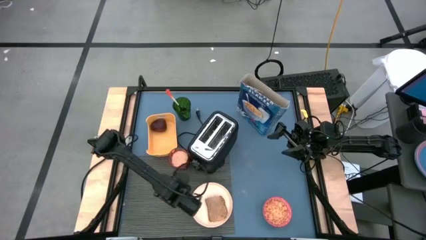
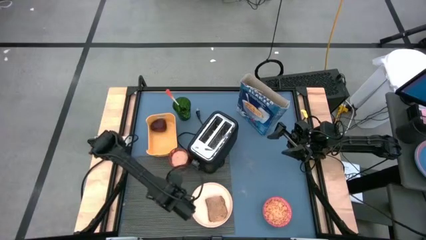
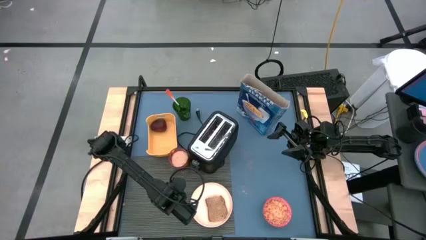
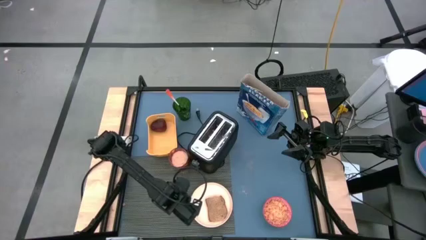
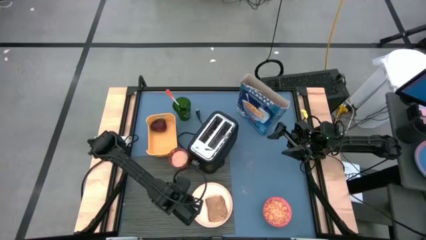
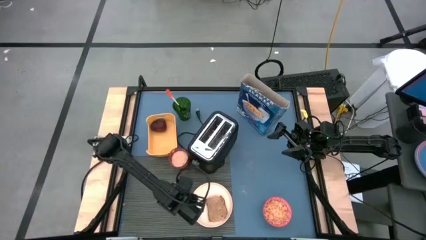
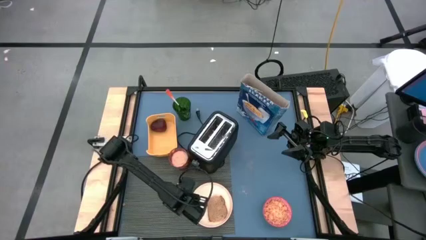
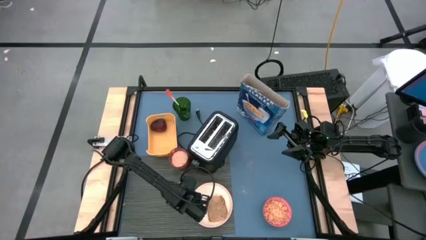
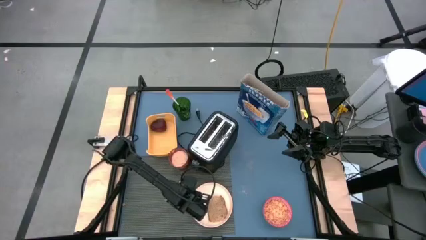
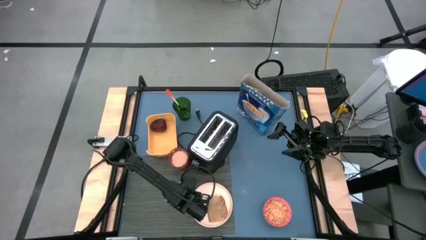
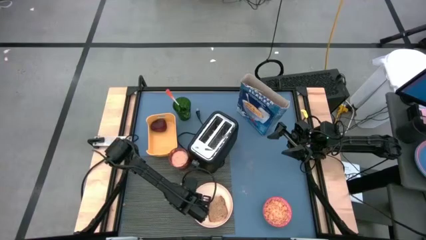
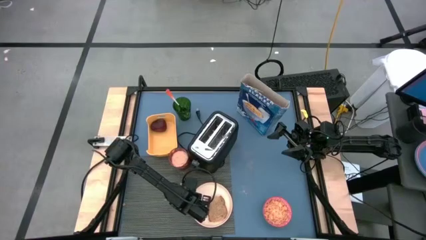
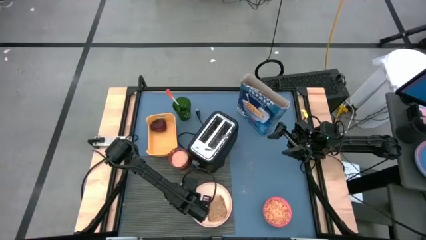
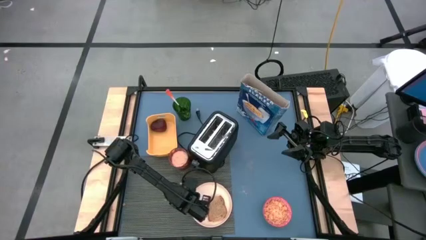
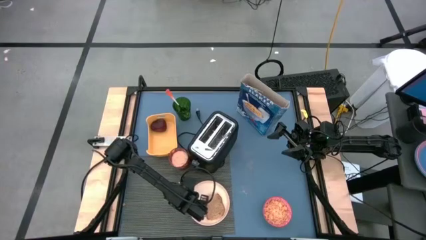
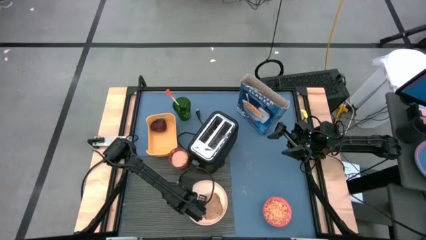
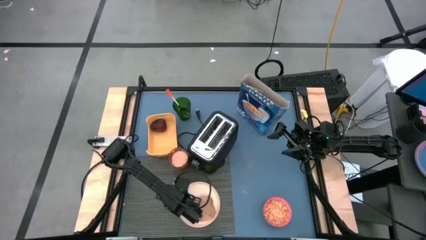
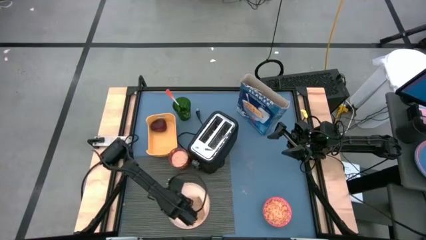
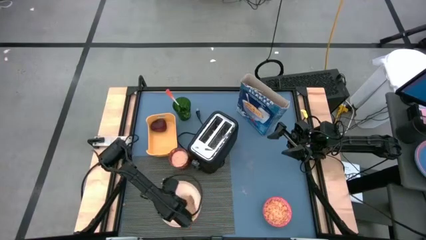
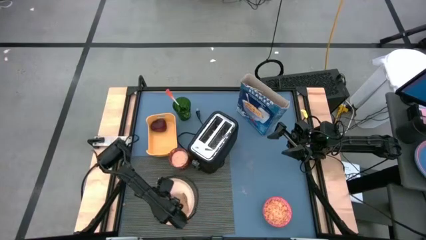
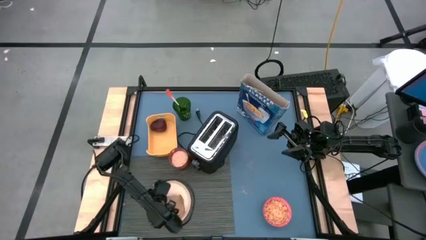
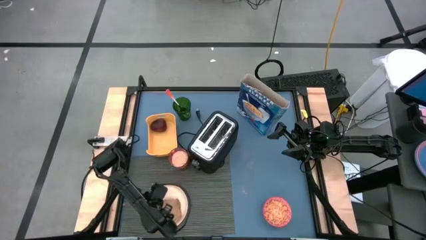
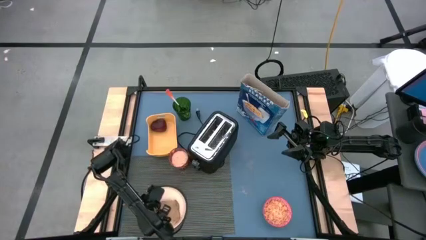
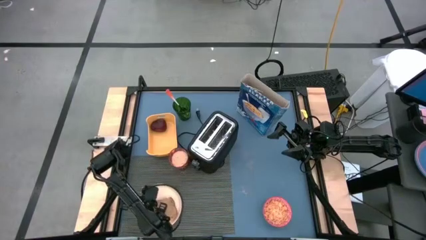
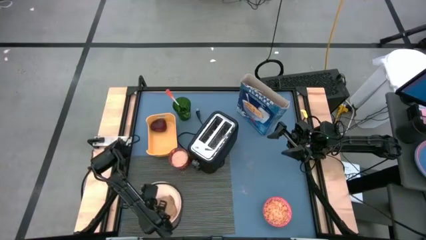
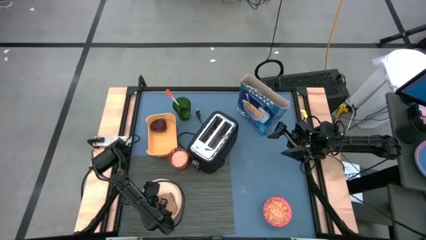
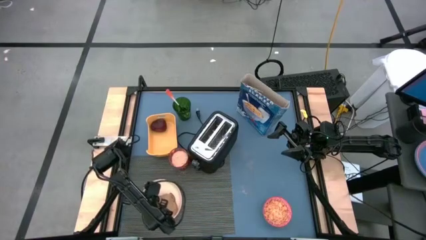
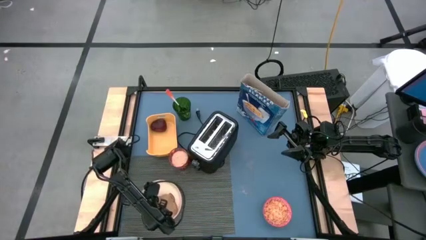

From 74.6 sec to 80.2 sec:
Task: Arrange a breakfast setting
Put the light orange plate to the center of the gray tablemat

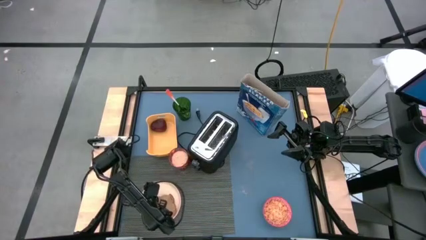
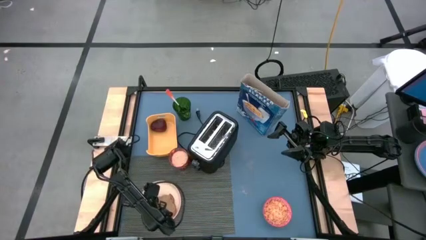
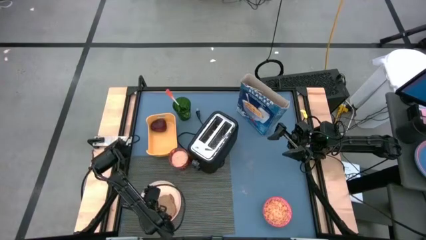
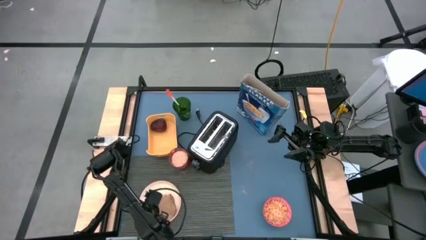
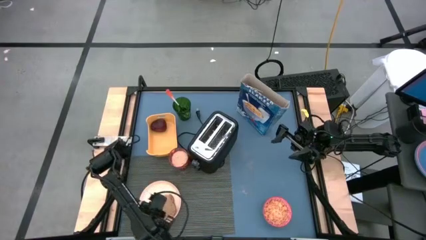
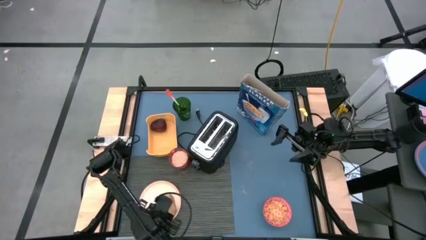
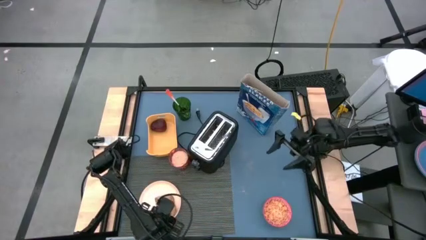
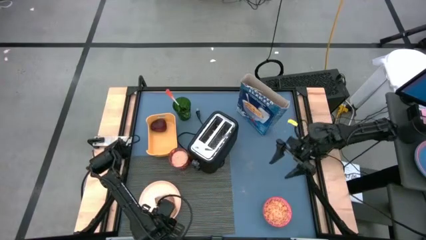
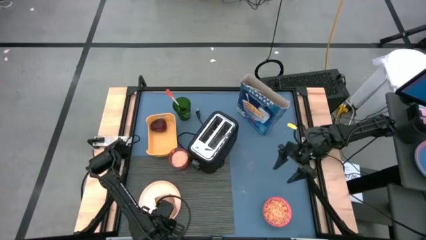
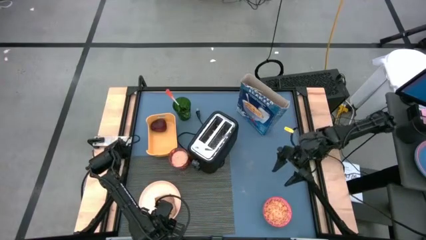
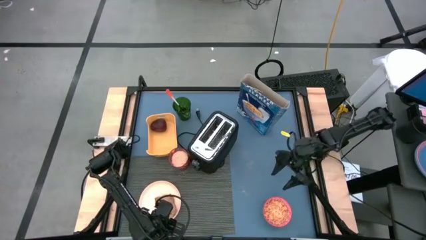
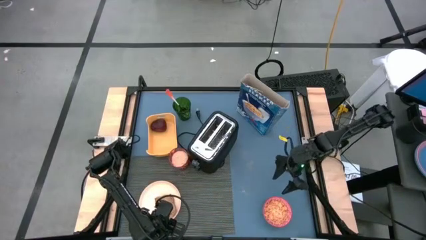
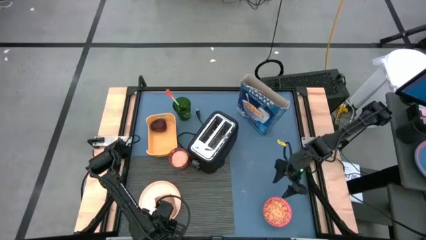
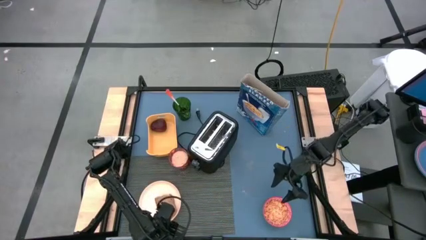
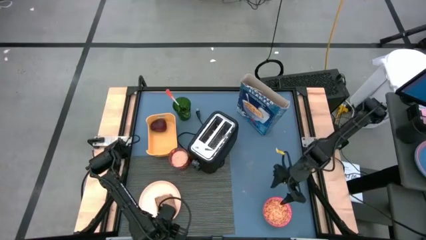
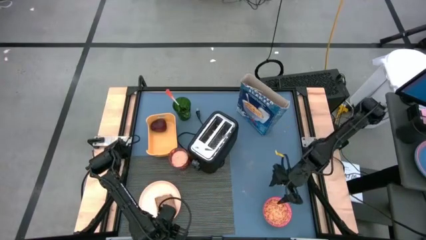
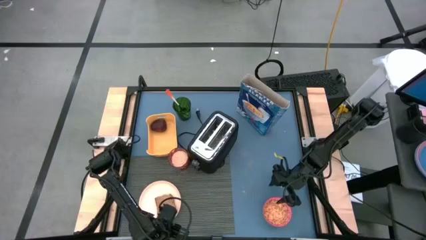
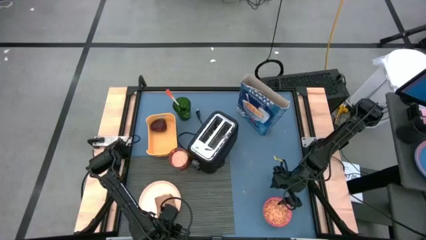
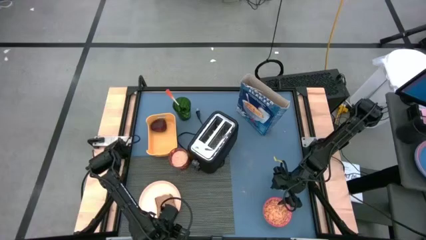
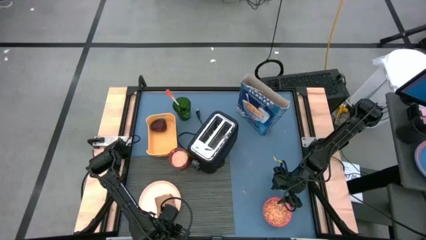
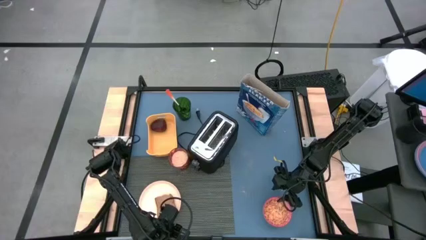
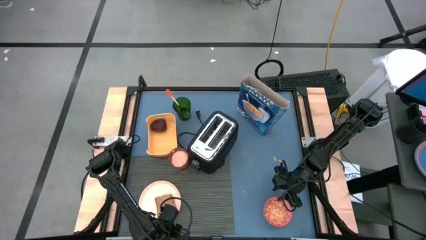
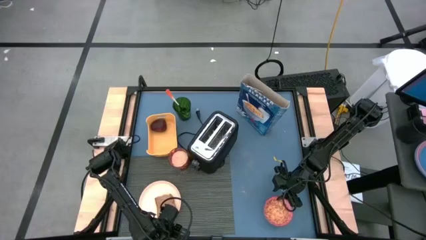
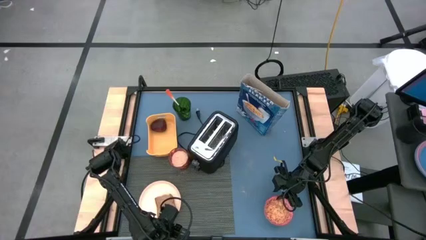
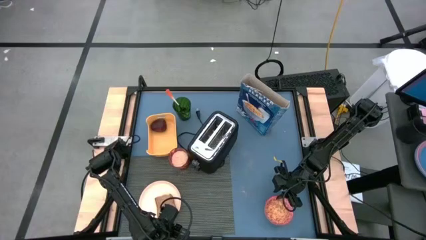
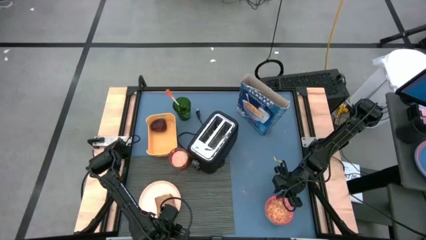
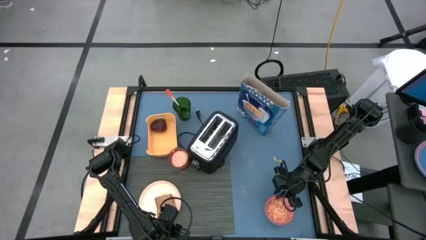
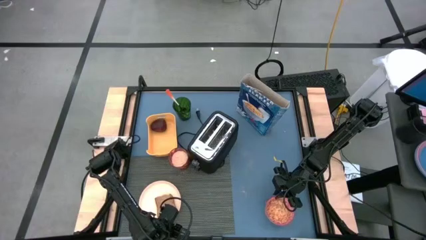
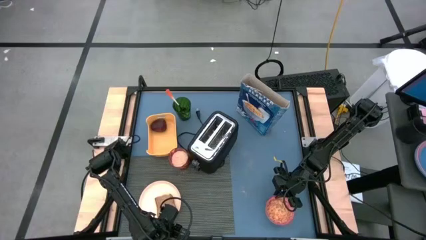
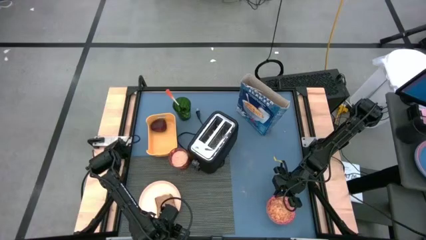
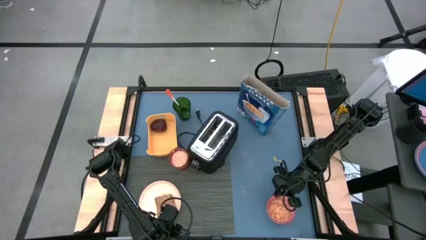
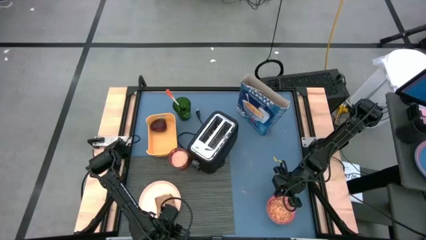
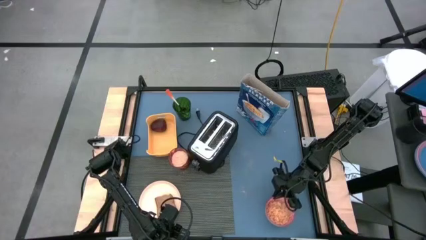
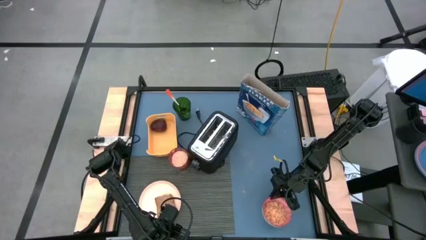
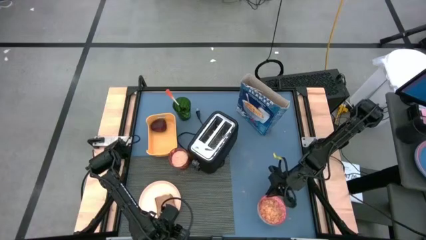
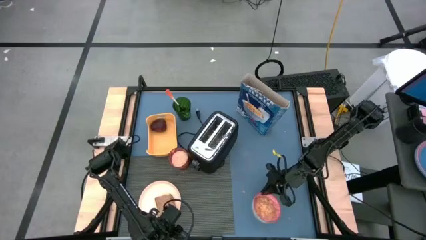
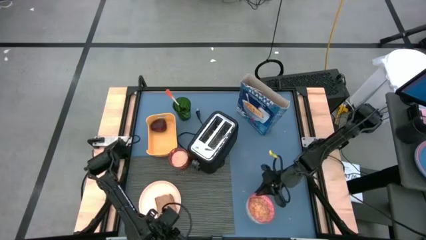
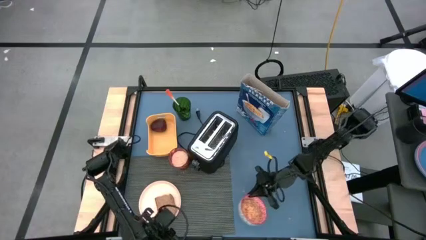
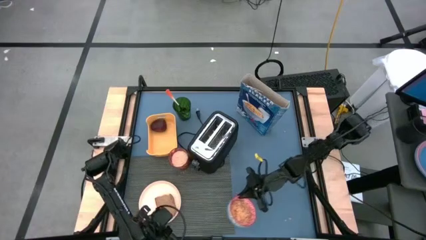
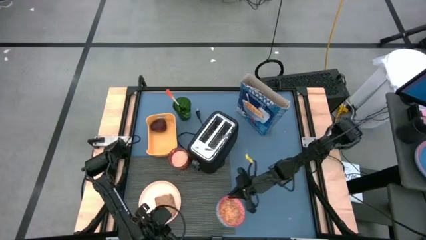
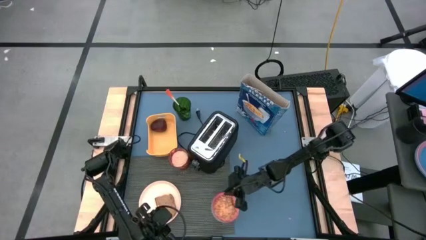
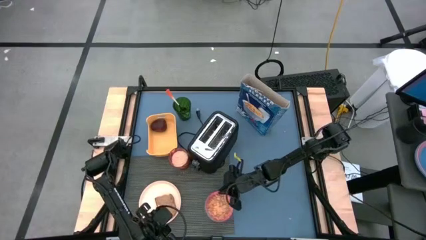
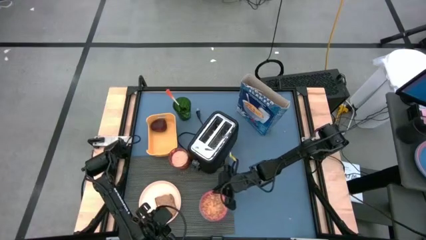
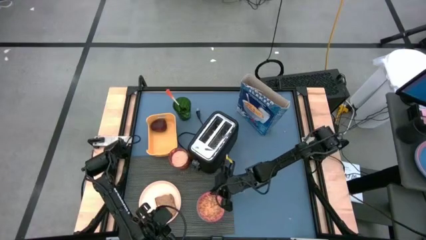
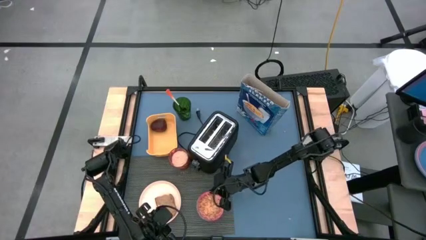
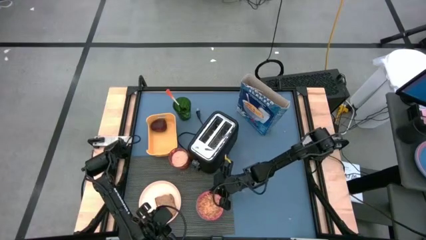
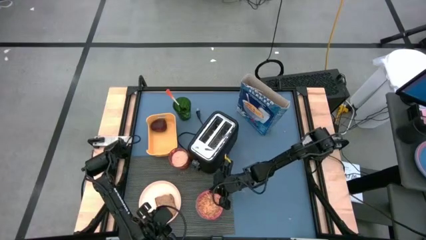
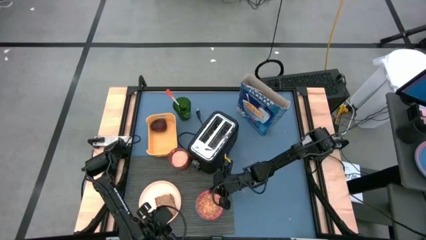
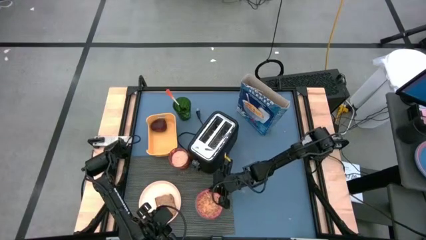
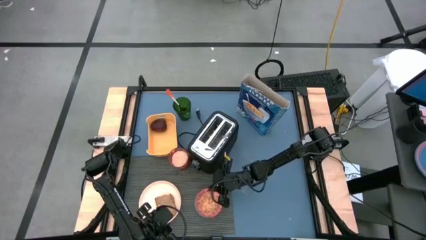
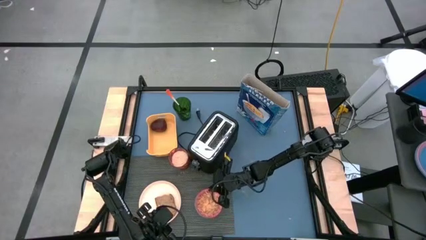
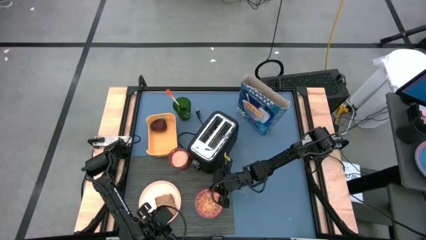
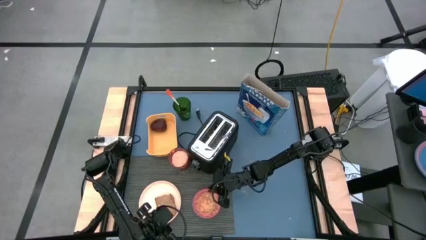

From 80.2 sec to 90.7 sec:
Put the red bowl to the gray tablemat to the right of the light orange plate
